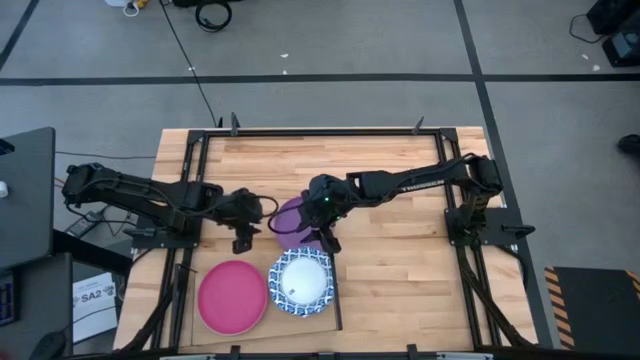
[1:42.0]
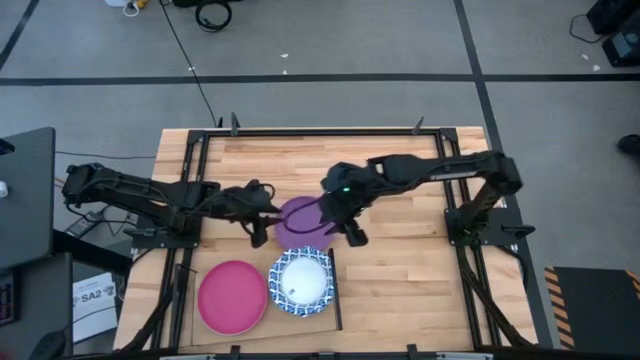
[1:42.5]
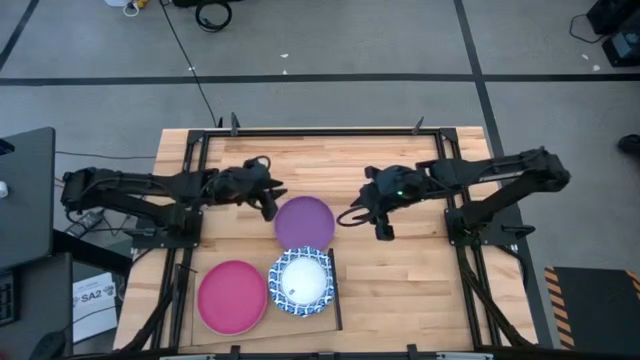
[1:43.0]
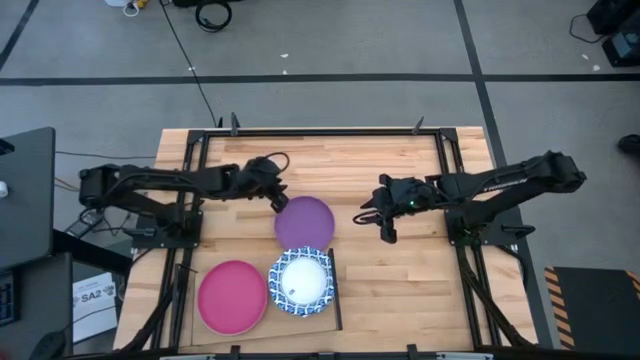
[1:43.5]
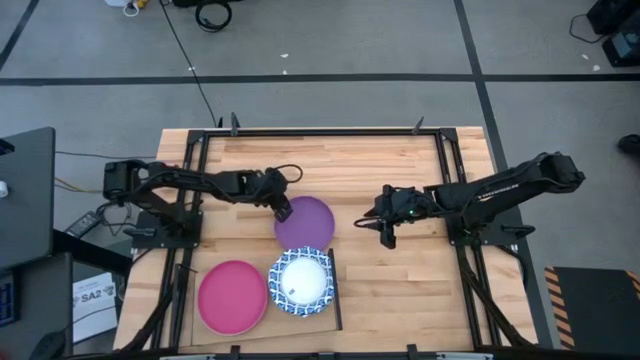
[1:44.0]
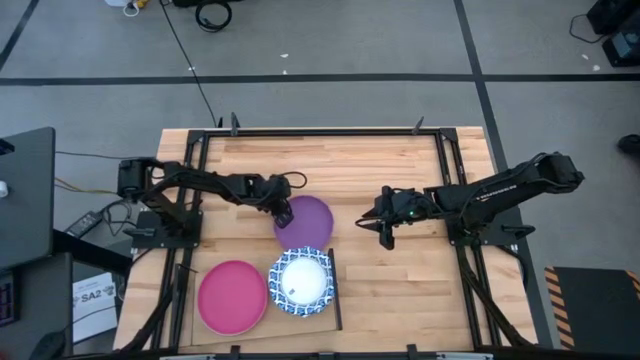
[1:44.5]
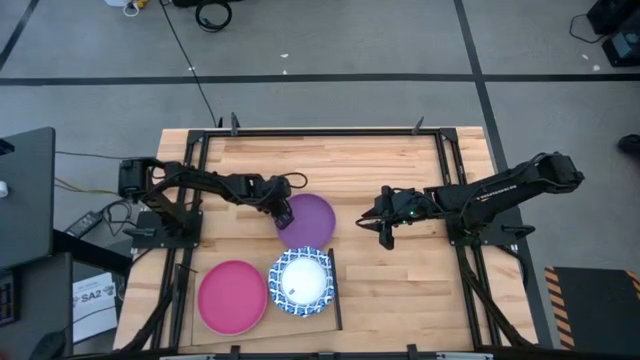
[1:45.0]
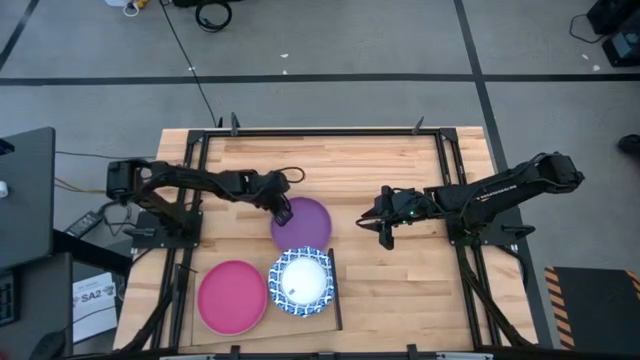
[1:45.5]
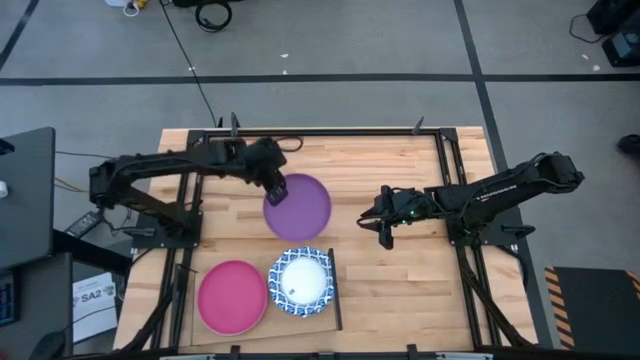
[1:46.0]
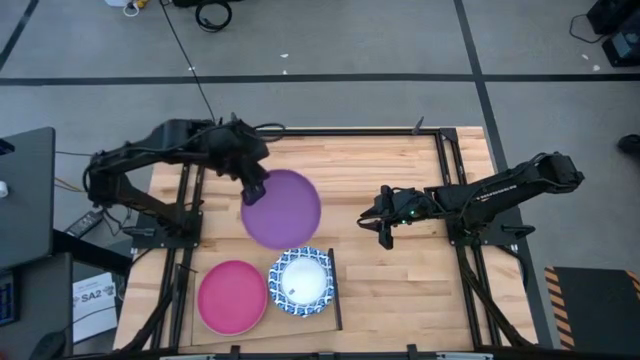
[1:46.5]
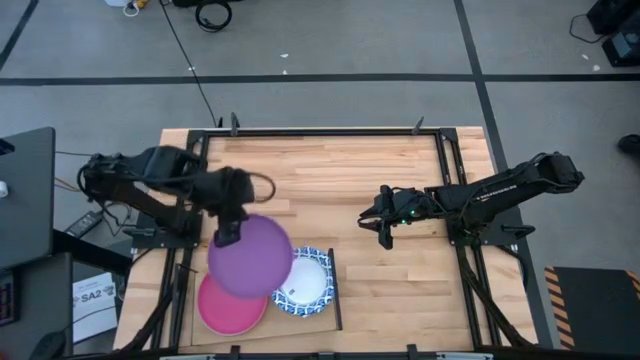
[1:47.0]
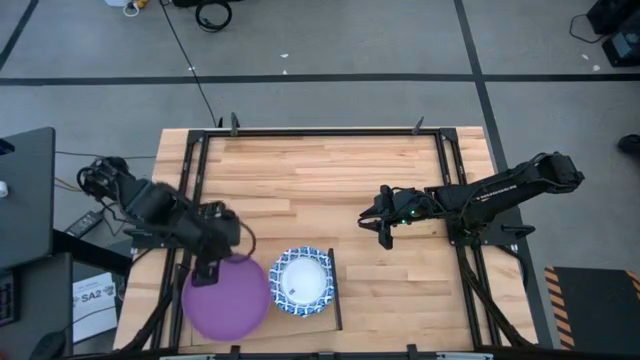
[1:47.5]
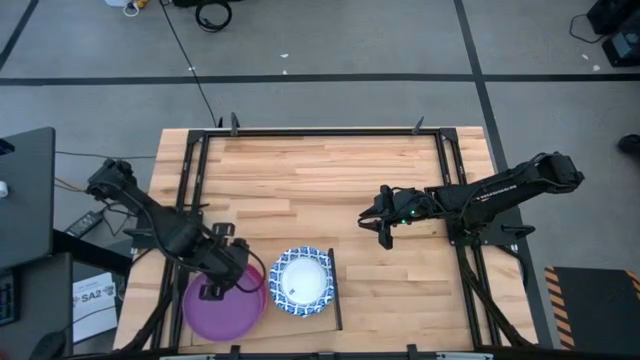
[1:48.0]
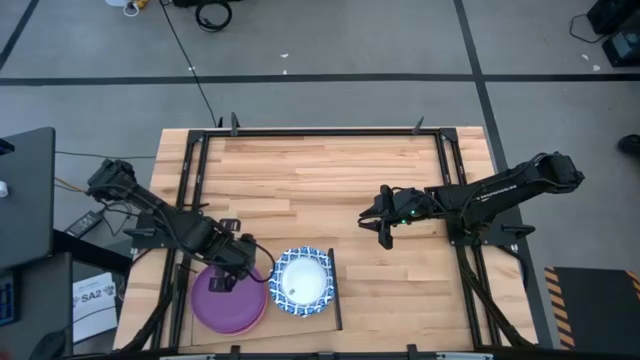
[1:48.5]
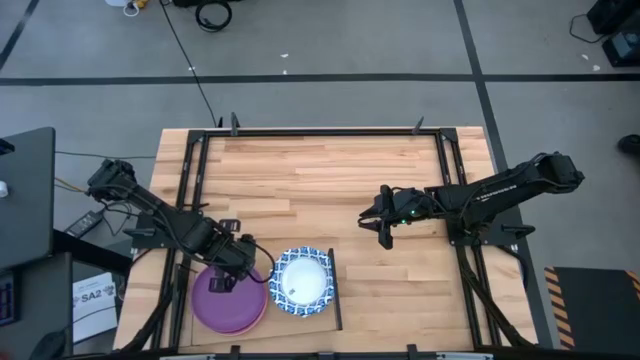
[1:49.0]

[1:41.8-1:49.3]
Task: Place and stack plates onto a shelf
Stack the purple plate on top of the pink plate on the shelf

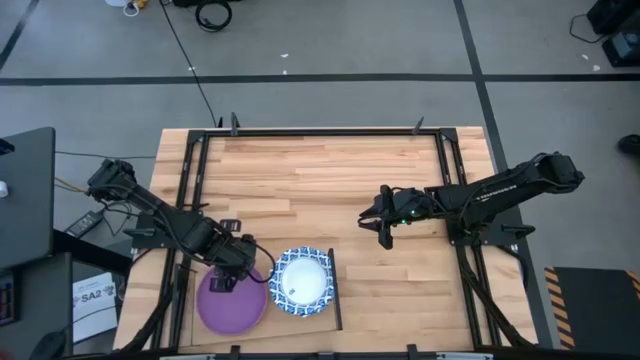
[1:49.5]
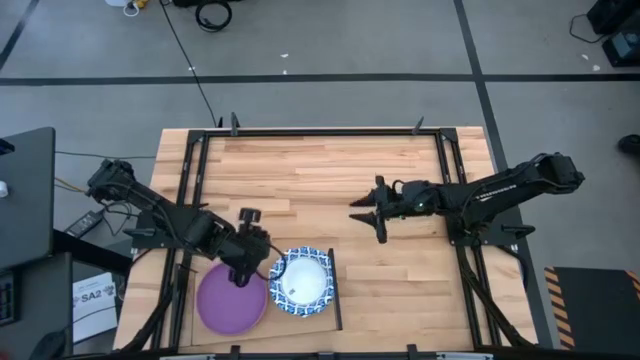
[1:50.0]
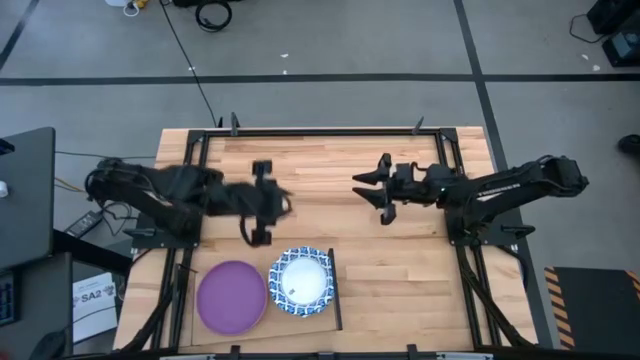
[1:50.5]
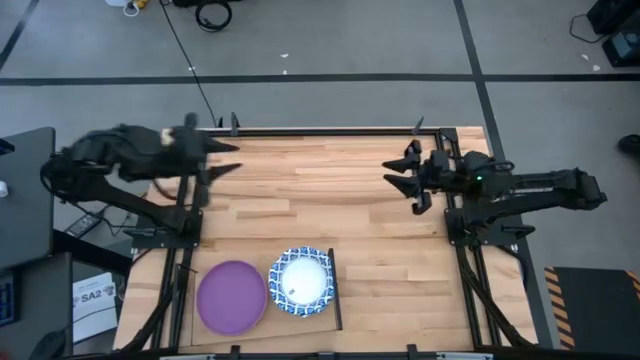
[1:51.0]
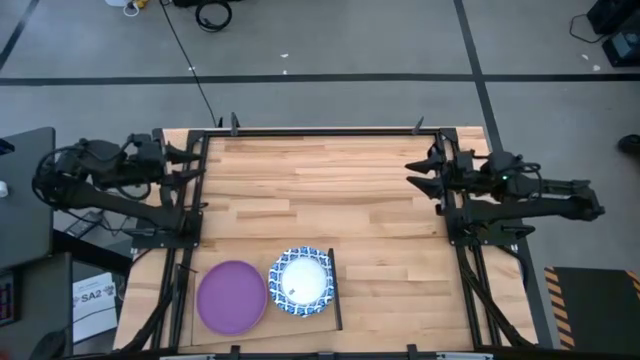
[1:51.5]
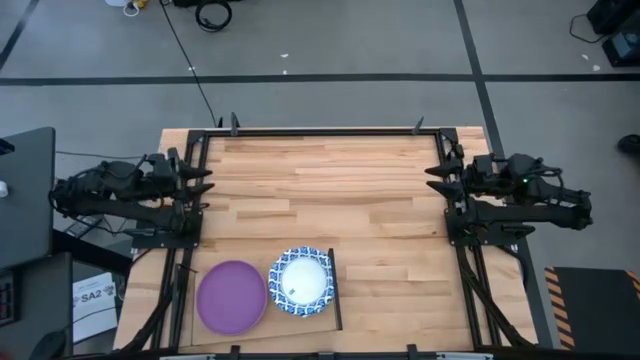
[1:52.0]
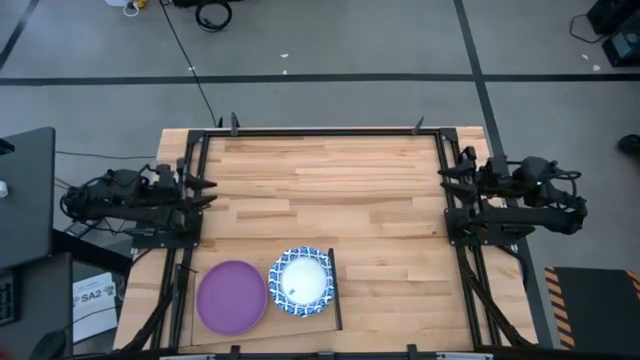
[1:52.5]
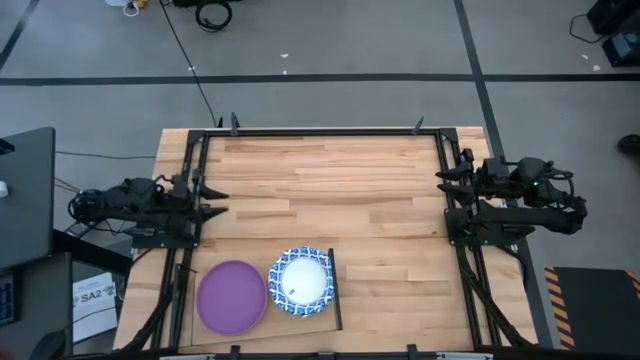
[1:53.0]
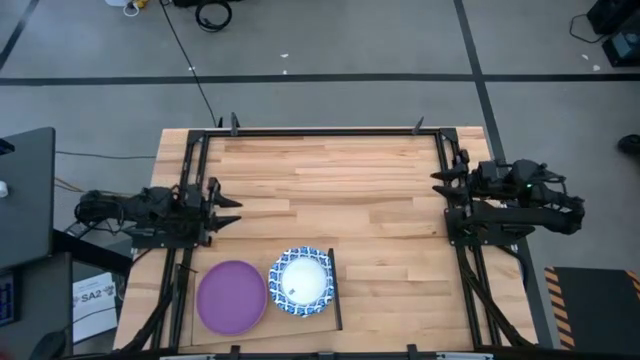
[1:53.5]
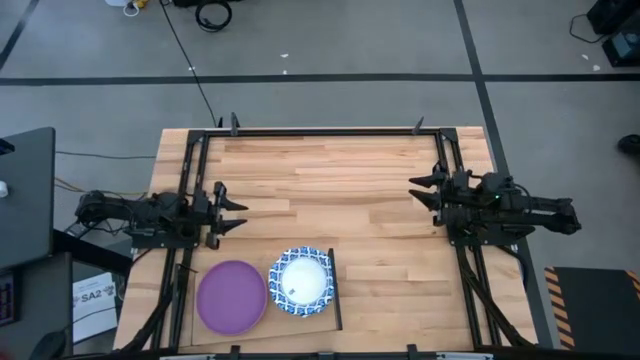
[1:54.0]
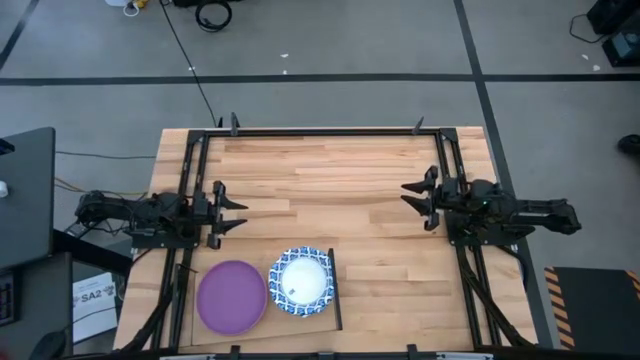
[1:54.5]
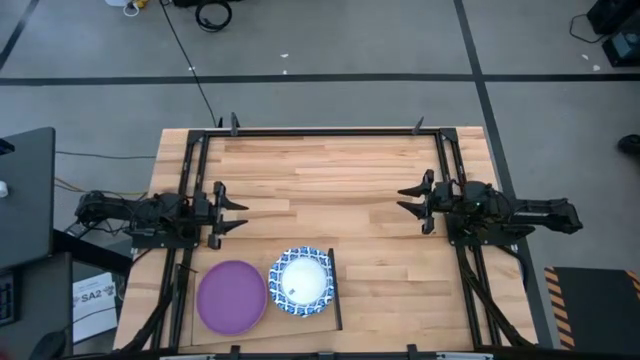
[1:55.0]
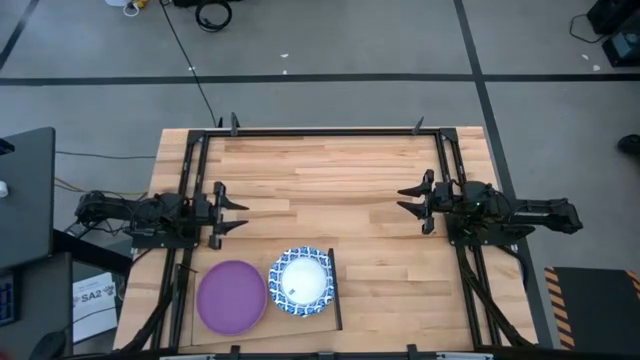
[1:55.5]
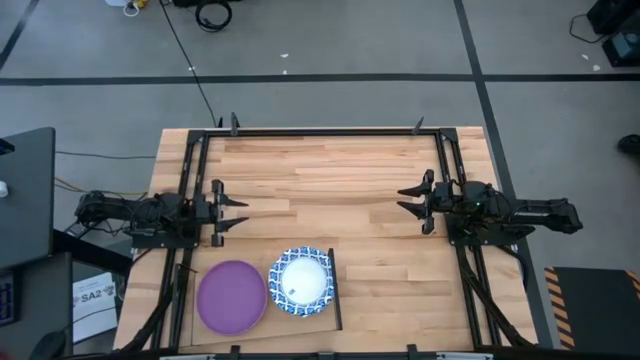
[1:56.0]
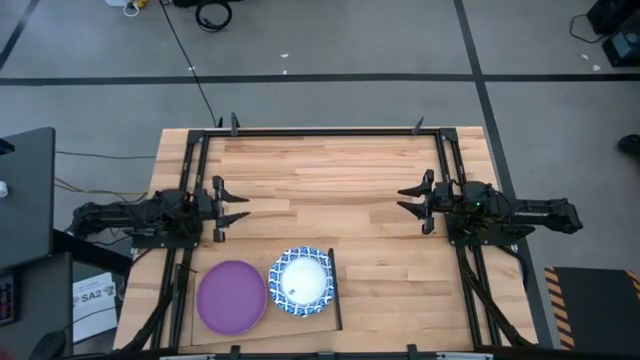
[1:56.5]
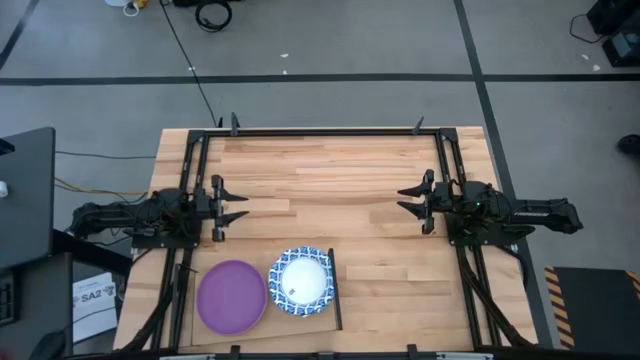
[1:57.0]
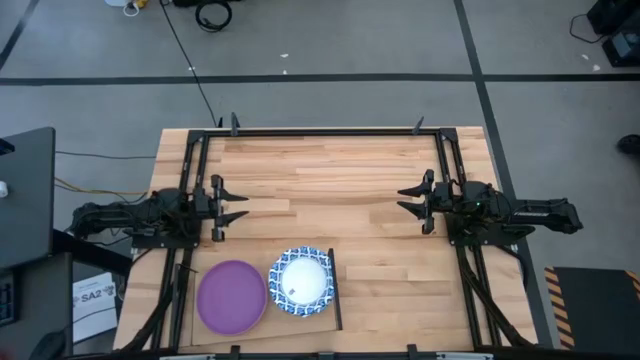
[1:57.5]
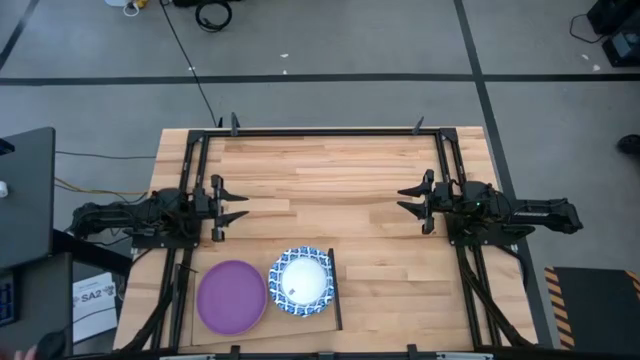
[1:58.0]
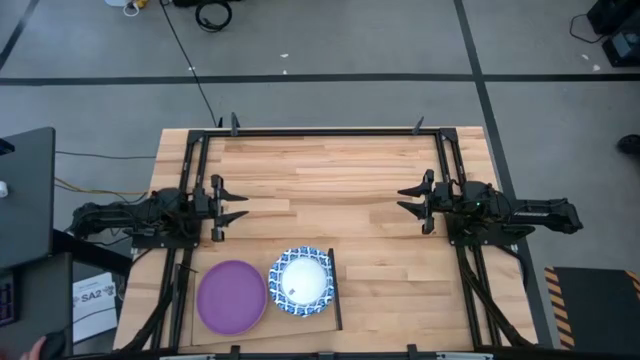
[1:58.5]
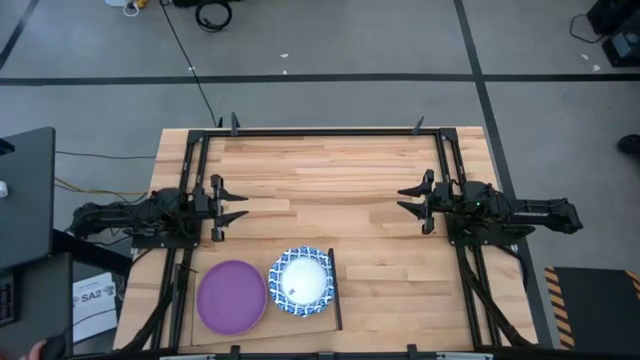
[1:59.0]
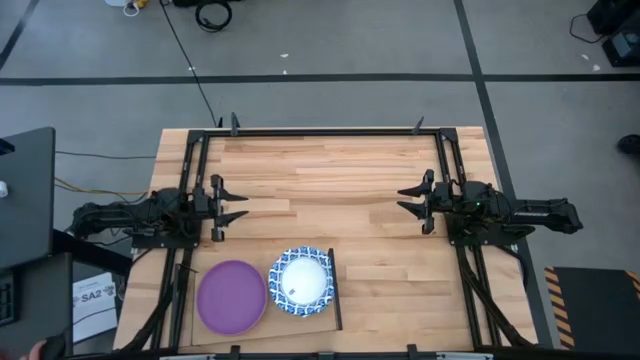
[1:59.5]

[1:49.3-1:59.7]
Return to Home Position

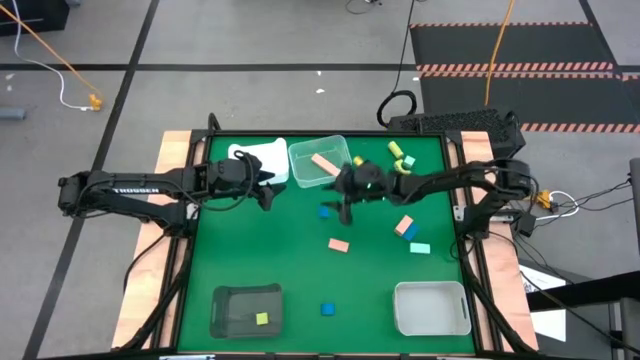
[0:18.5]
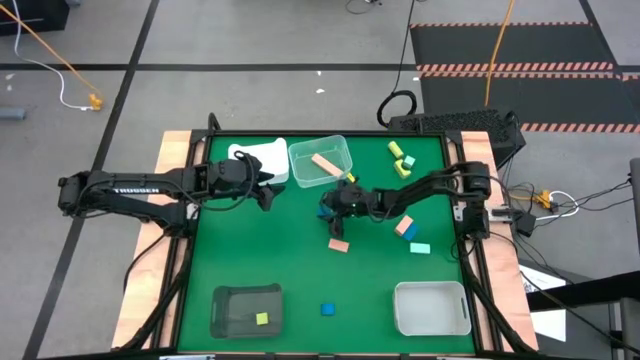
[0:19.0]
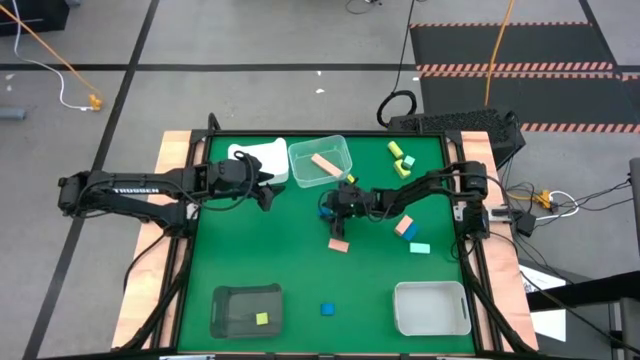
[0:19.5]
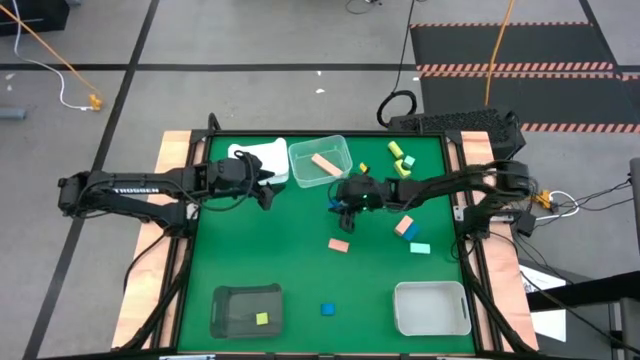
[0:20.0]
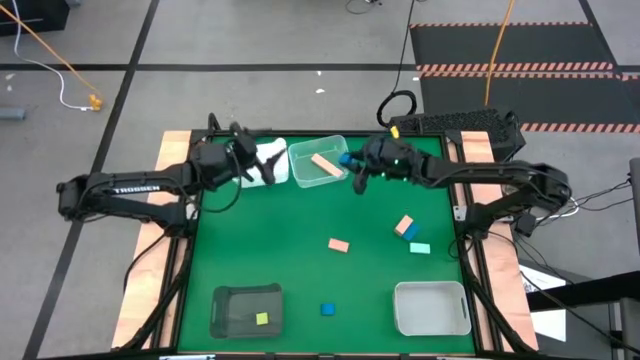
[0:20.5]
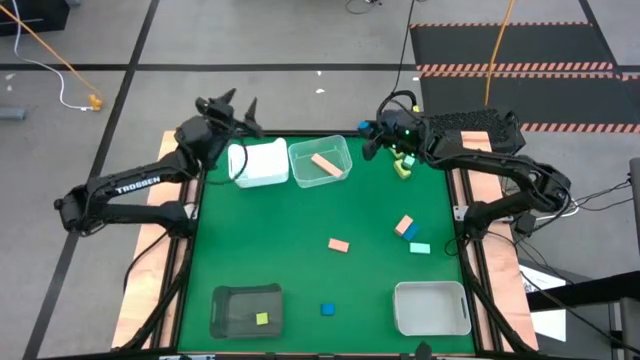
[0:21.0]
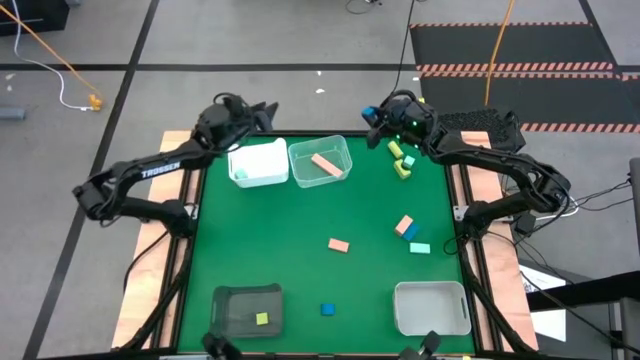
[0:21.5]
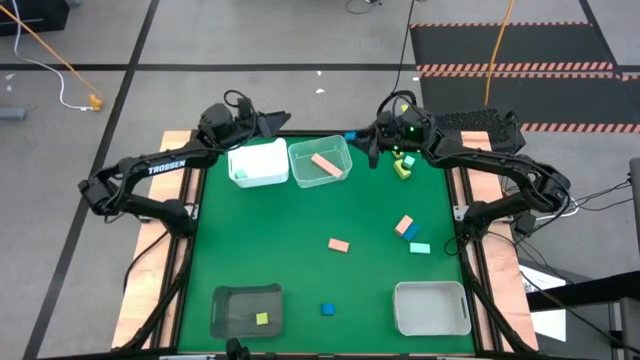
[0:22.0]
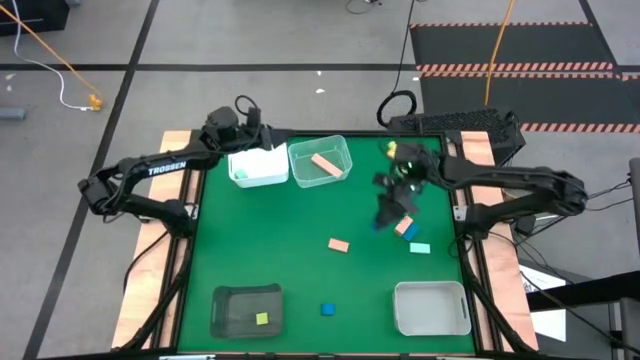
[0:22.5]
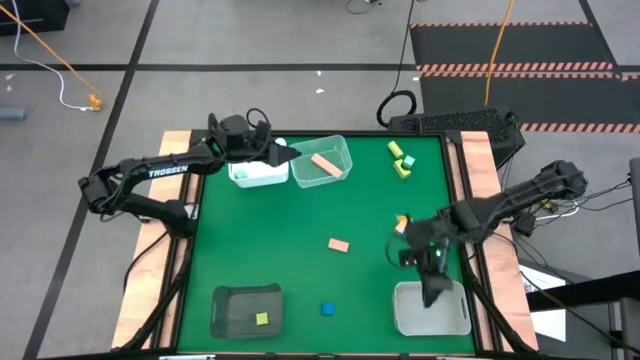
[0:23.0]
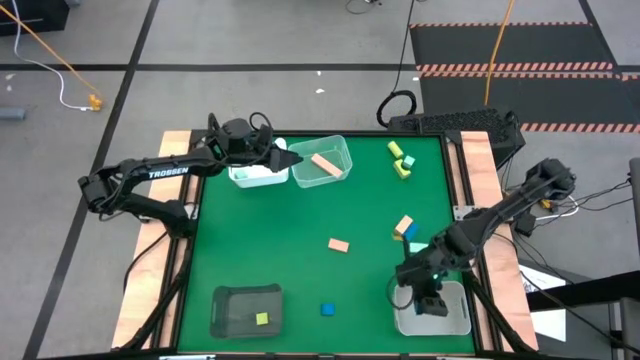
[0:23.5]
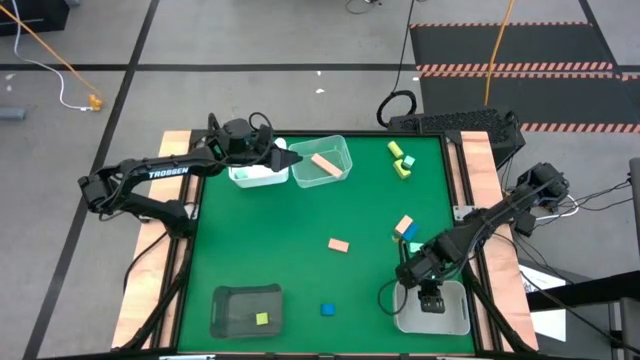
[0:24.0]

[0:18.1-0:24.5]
Task: Sort & place blocks by color
Put the top left blue block into the gray bin
